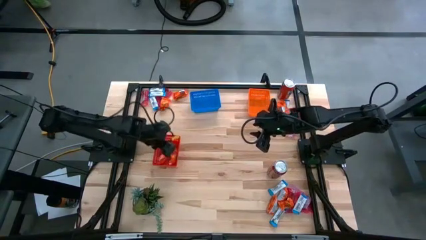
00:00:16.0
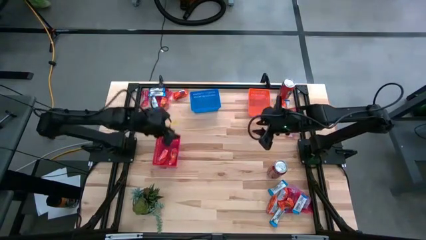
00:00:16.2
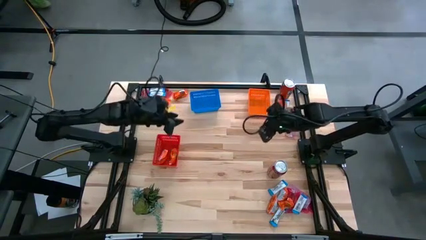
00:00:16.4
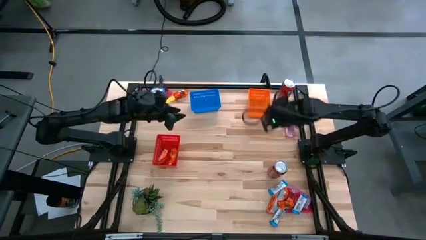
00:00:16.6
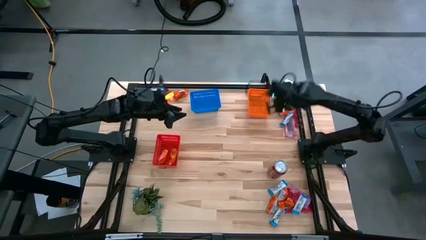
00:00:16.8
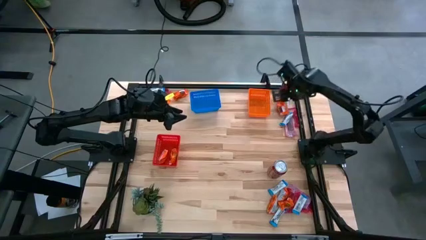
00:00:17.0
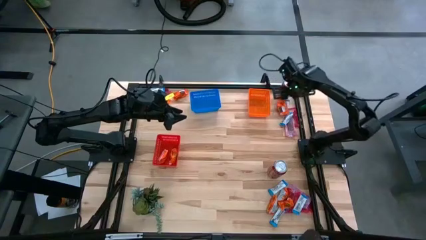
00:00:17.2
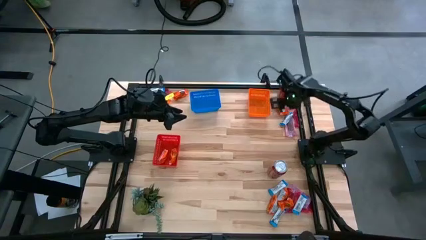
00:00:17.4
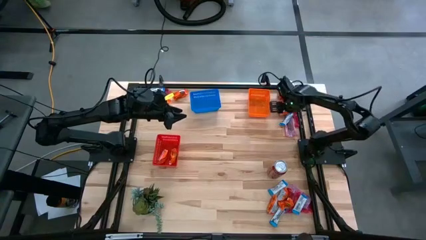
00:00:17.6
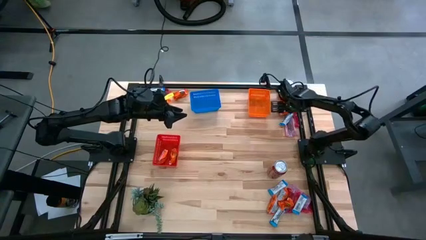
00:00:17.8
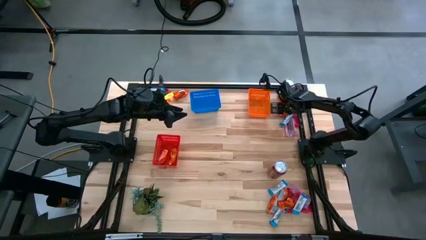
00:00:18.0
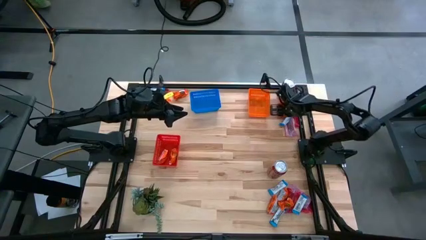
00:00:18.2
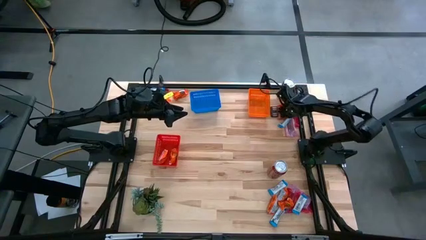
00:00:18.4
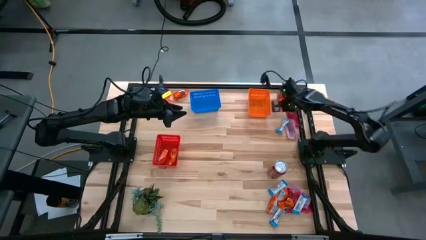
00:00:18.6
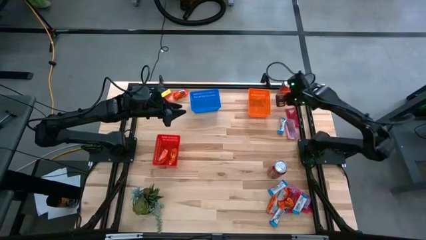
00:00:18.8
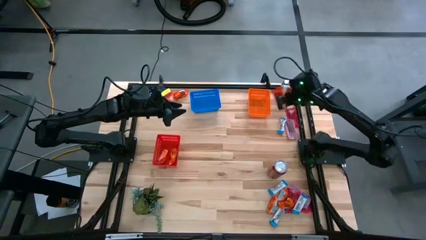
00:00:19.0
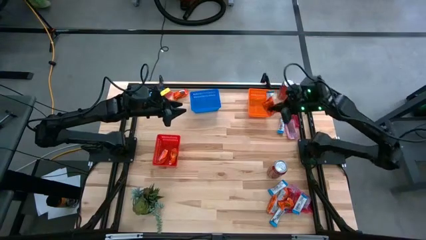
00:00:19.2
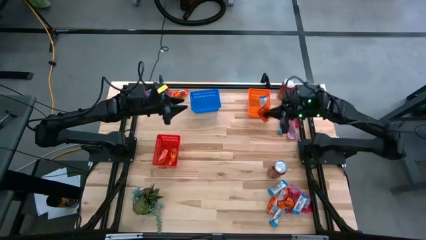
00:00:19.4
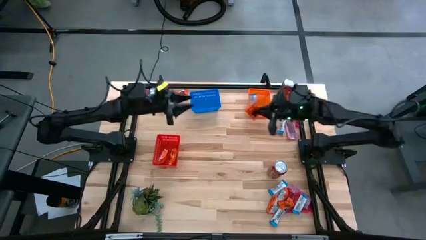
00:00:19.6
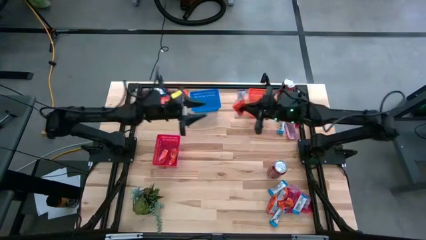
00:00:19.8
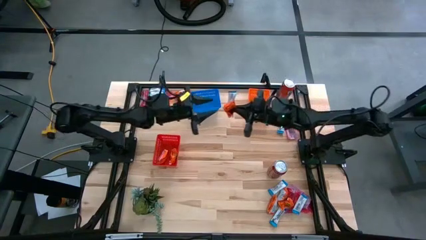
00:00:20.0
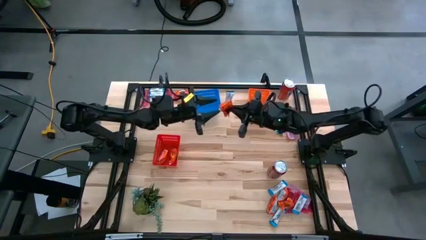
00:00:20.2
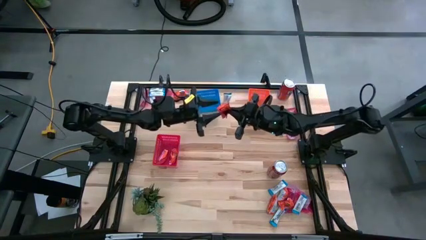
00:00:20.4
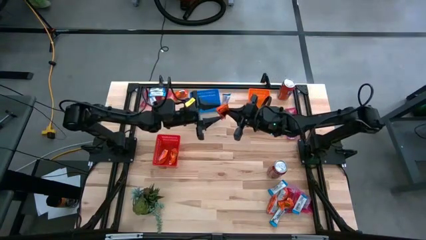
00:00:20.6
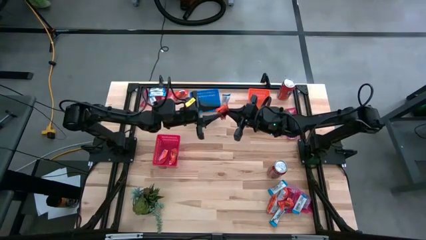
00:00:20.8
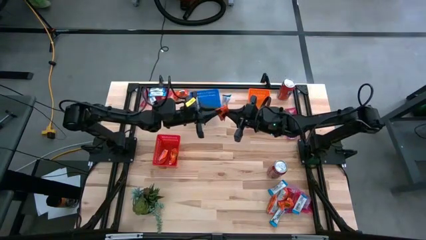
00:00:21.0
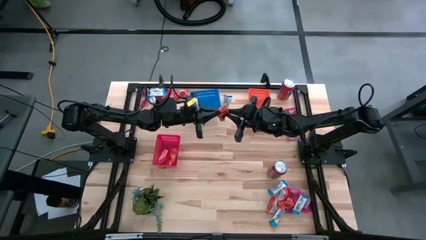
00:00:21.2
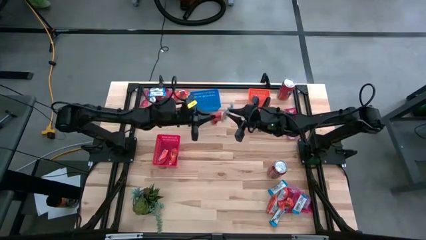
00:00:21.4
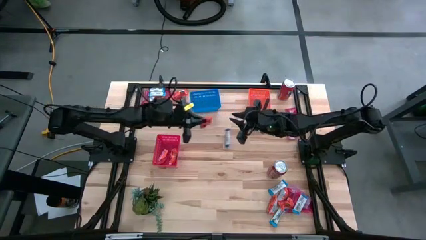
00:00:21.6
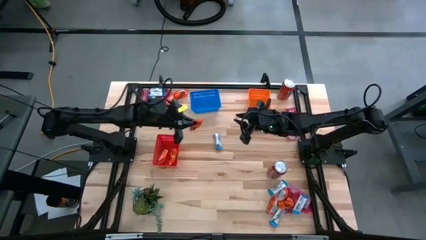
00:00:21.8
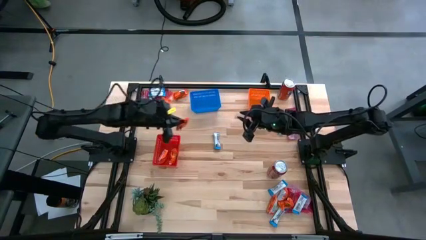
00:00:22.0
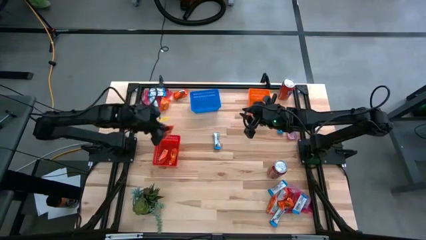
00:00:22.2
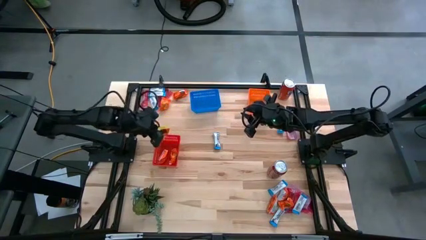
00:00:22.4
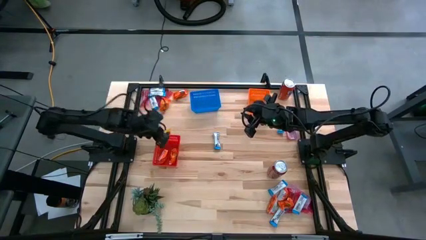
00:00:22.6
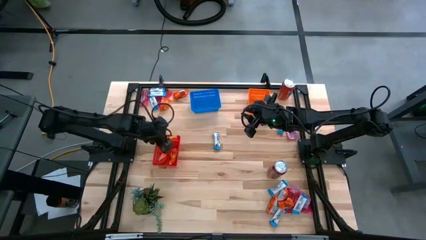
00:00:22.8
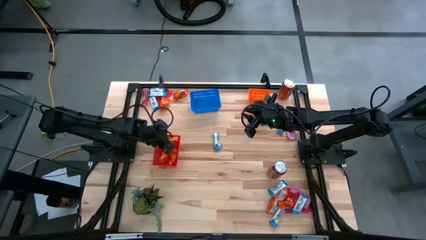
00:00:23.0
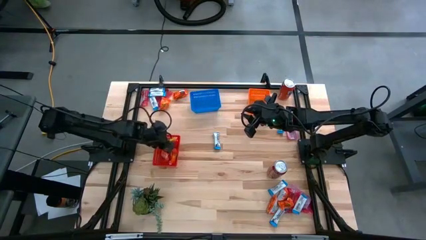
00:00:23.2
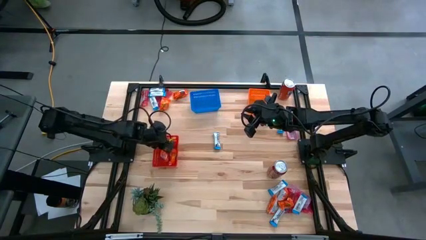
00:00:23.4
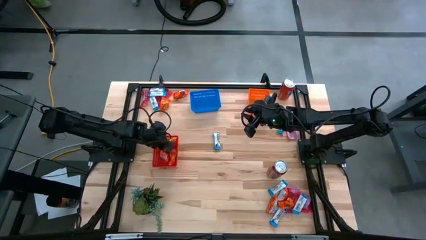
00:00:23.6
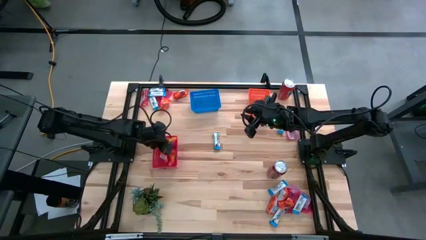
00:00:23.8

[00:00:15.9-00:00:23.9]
Task: Sort candy
Put the orange candy pack into the red basket

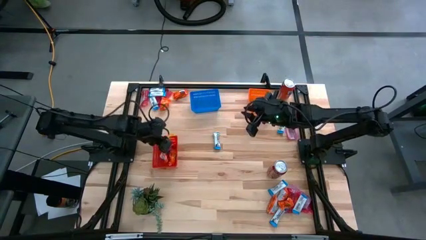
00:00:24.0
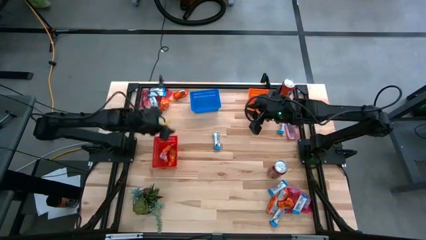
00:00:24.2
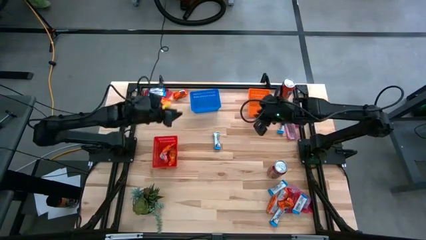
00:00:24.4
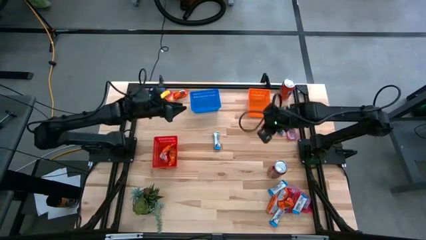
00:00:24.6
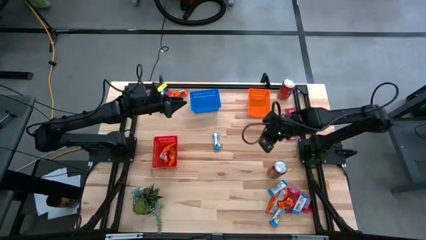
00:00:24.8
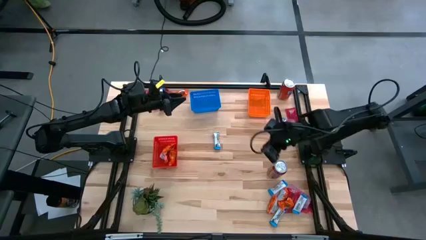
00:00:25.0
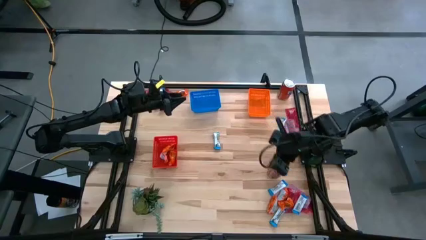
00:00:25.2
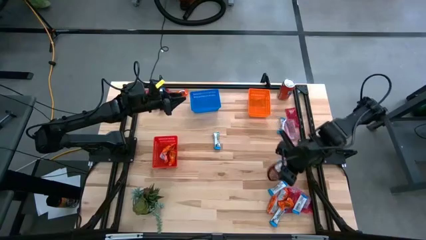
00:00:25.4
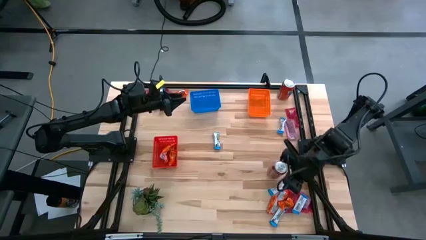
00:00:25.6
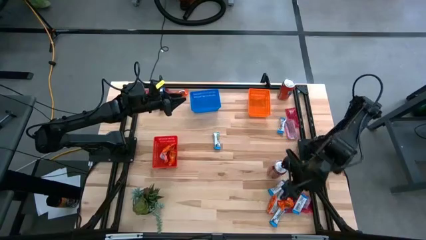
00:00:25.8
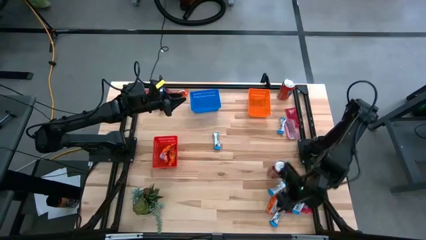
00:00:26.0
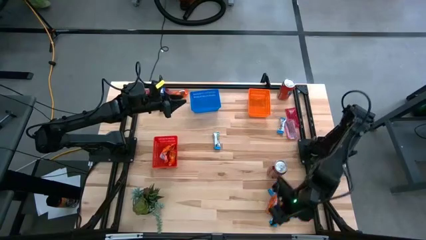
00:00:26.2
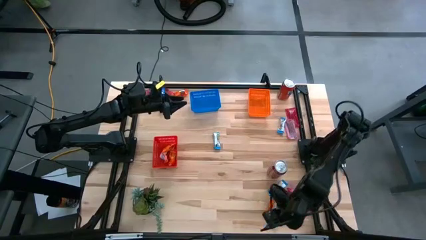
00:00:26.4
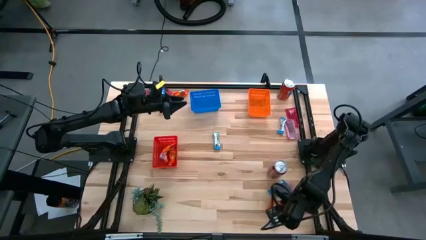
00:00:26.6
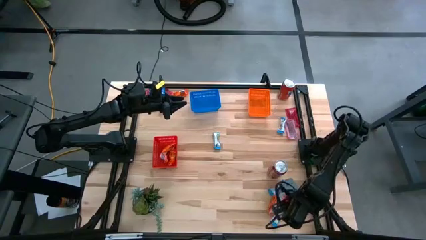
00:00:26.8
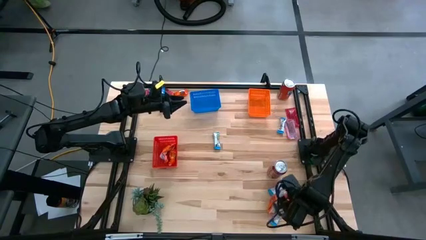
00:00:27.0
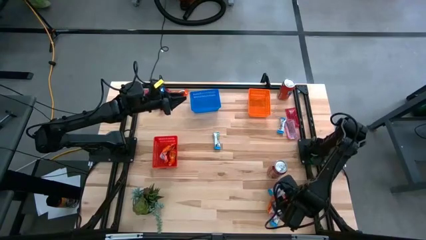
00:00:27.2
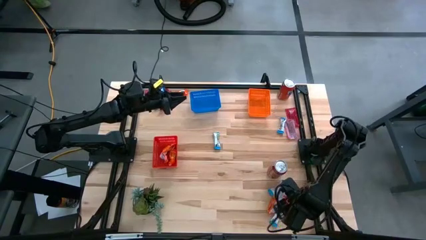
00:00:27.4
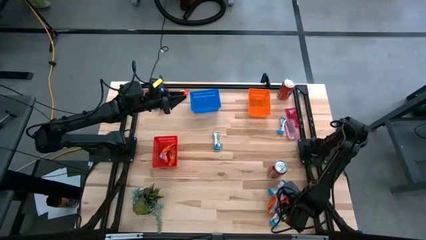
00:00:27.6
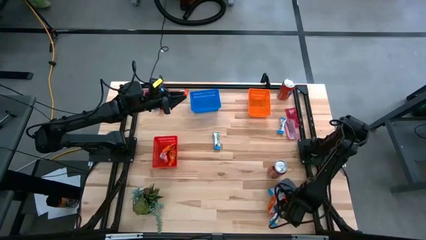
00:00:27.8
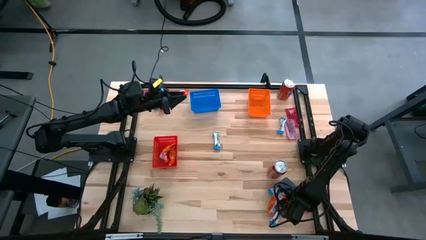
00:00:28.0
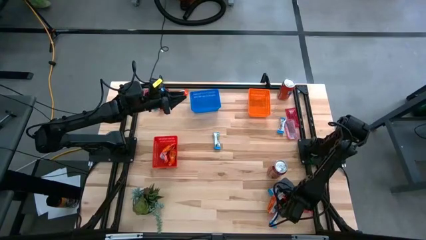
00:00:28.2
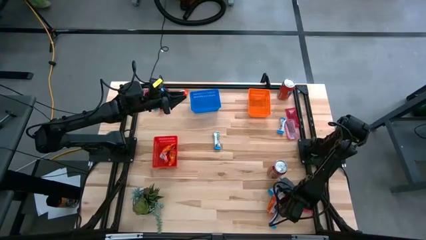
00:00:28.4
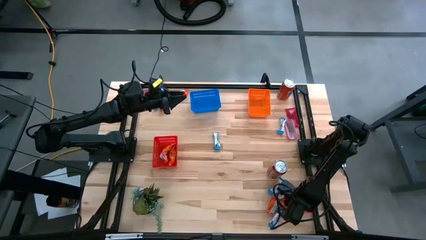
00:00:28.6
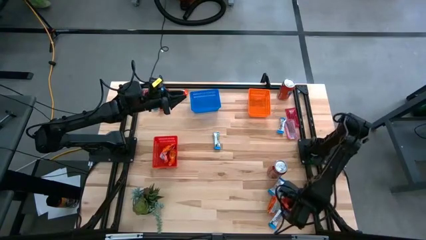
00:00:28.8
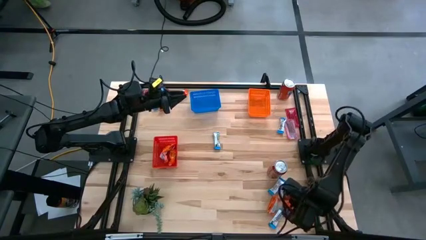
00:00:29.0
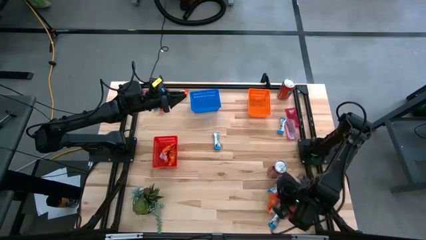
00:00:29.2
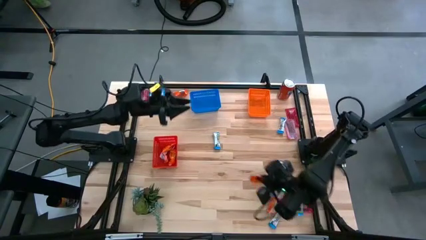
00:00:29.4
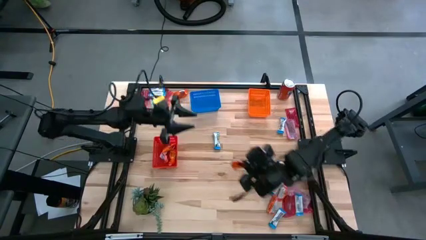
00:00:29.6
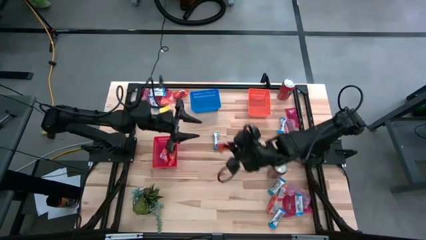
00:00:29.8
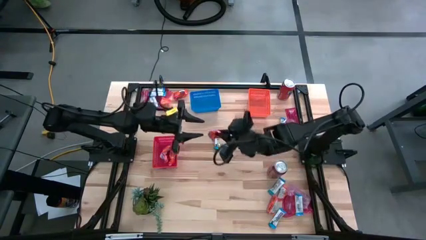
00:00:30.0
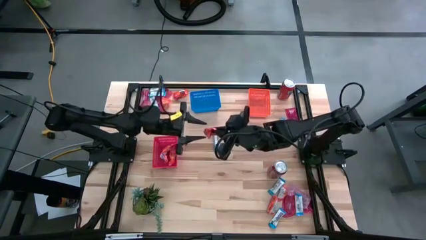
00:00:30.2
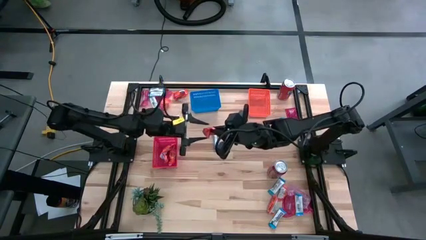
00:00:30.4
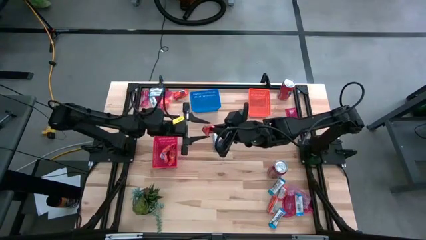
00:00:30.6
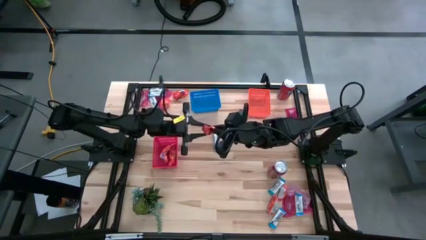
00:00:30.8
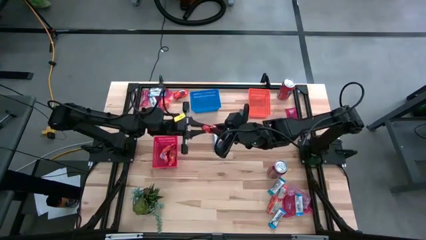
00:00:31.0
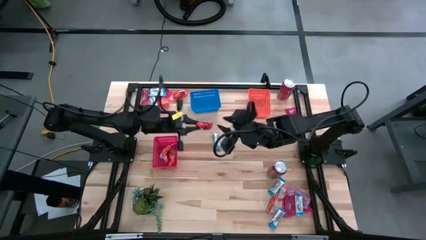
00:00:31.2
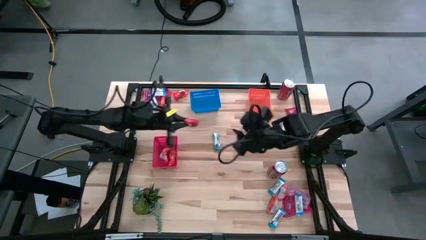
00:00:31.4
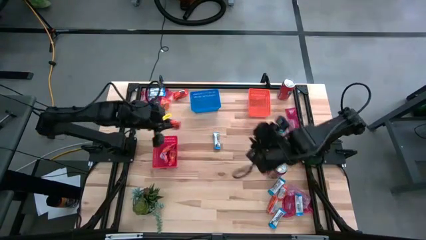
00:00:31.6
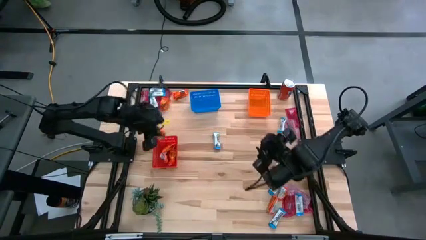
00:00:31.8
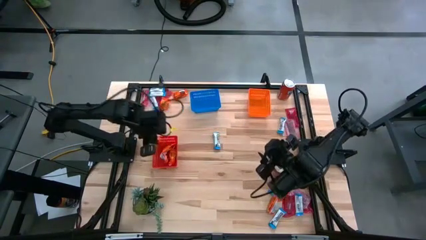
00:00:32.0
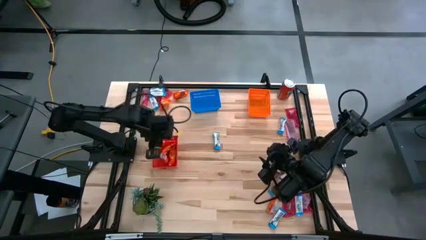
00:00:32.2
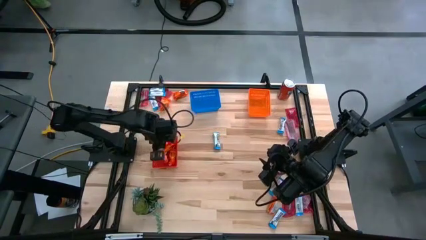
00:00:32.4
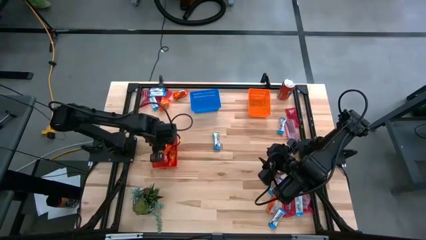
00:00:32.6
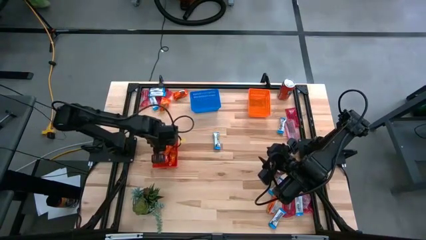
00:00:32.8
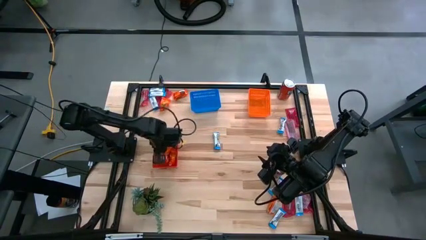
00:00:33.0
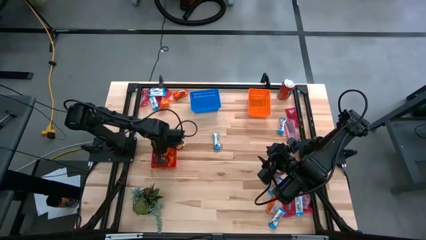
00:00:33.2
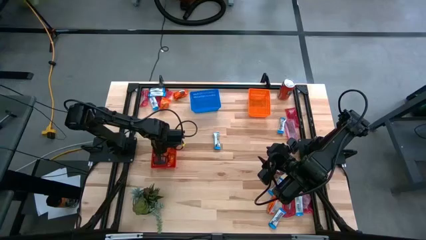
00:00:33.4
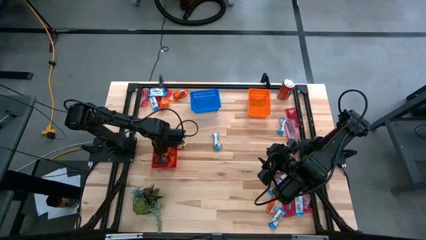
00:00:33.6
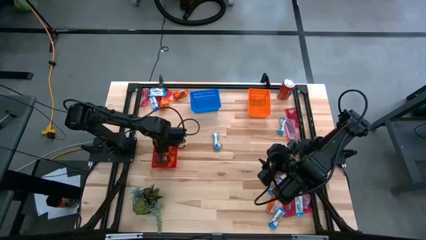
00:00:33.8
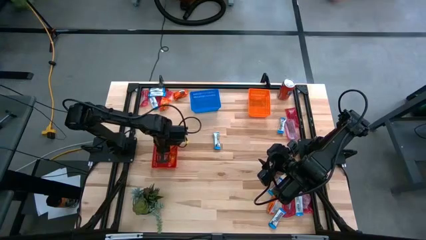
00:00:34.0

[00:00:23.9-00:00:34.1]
Put the orange candy pack into the red basket
